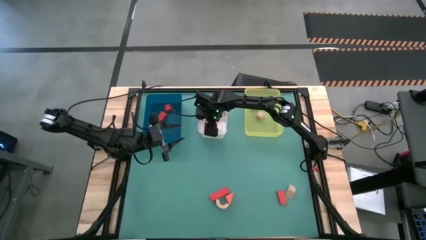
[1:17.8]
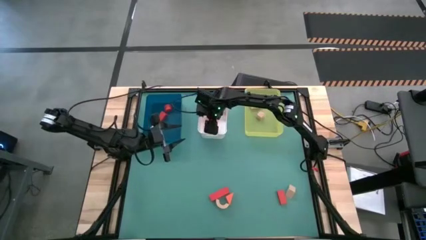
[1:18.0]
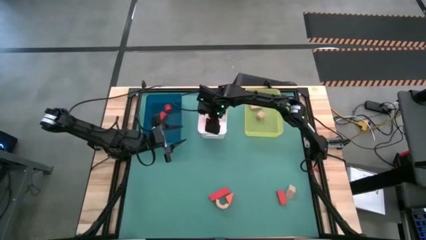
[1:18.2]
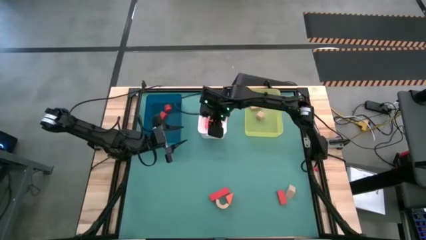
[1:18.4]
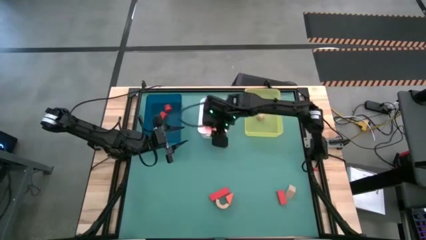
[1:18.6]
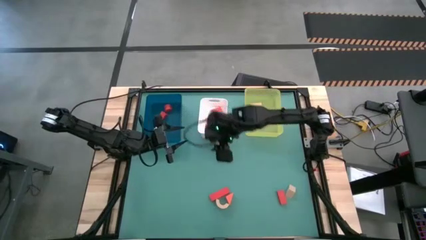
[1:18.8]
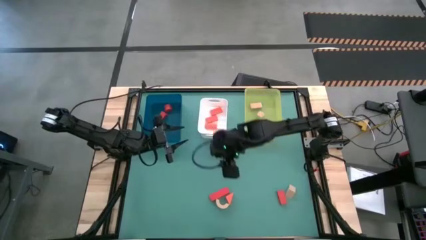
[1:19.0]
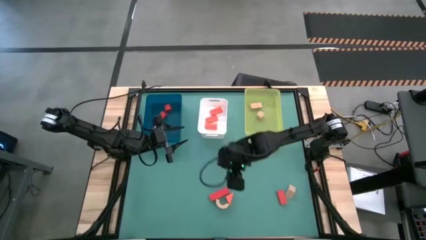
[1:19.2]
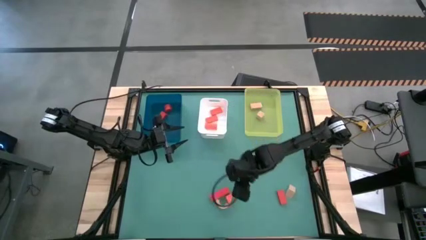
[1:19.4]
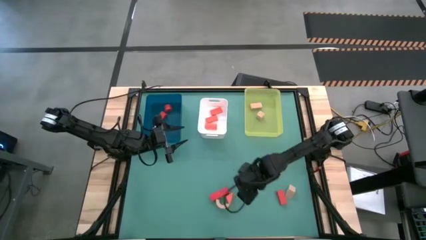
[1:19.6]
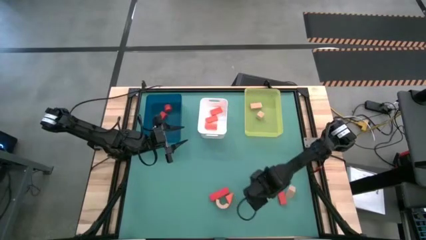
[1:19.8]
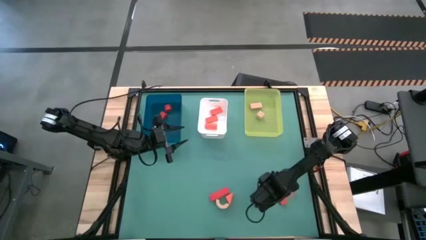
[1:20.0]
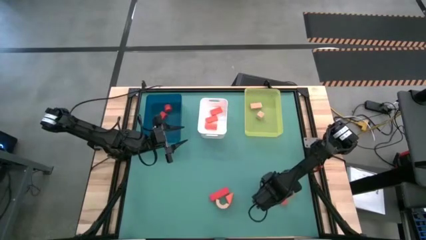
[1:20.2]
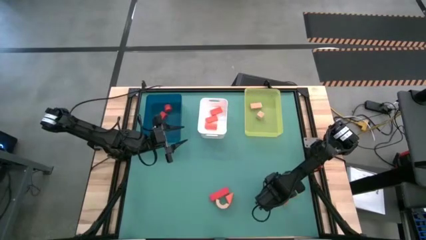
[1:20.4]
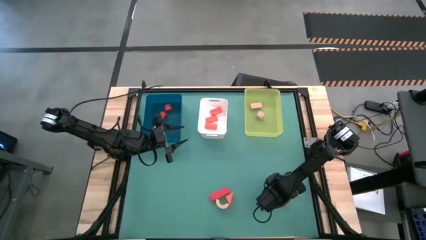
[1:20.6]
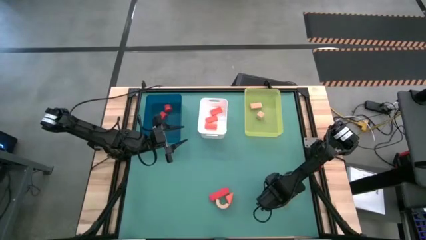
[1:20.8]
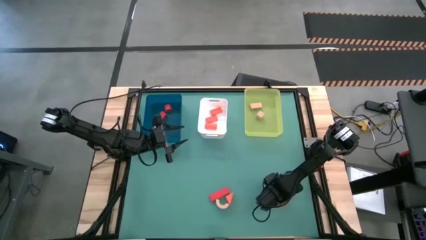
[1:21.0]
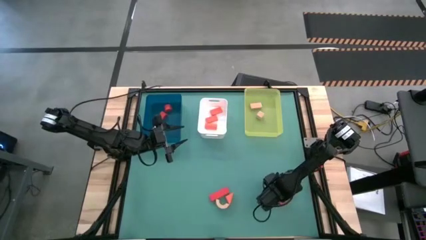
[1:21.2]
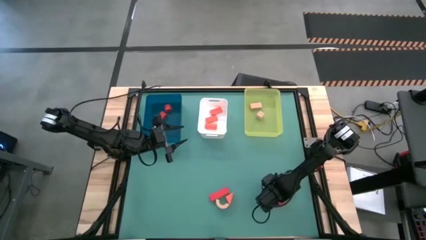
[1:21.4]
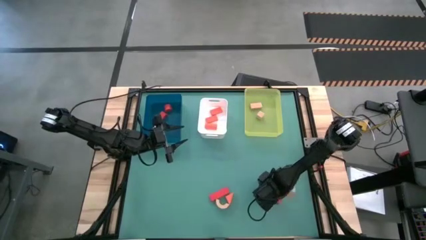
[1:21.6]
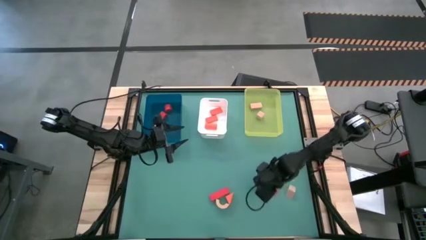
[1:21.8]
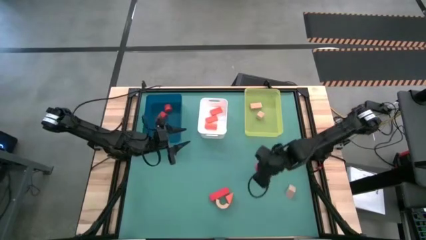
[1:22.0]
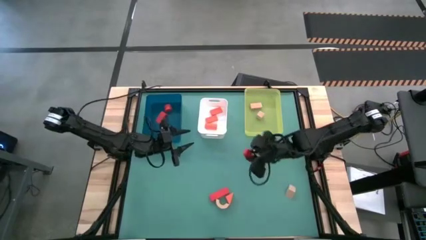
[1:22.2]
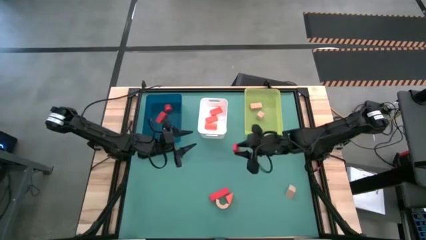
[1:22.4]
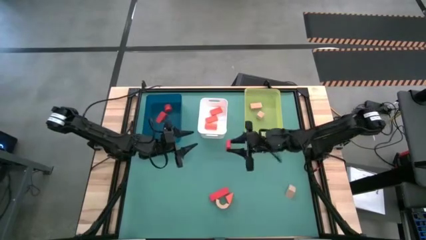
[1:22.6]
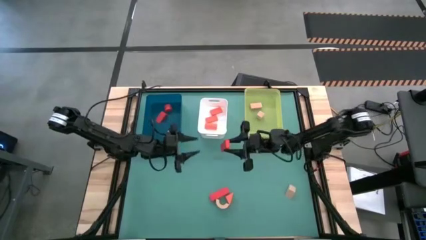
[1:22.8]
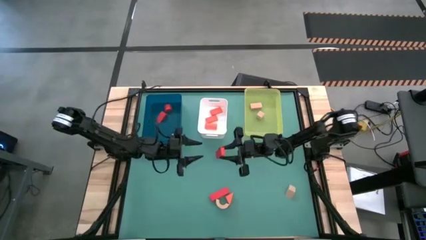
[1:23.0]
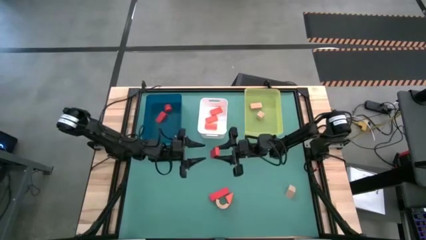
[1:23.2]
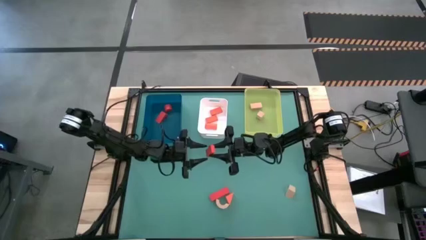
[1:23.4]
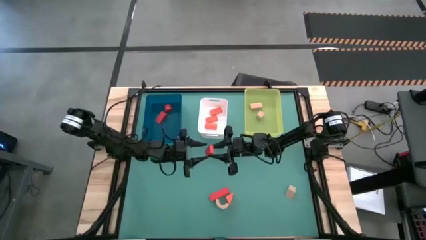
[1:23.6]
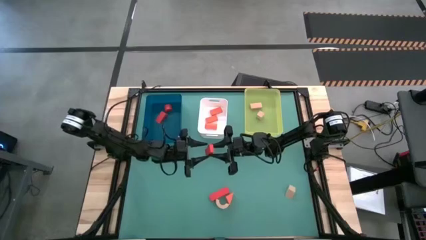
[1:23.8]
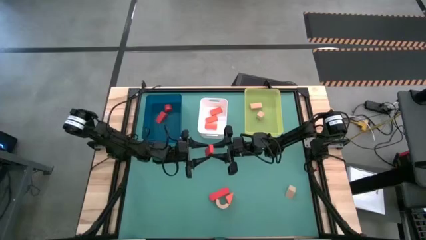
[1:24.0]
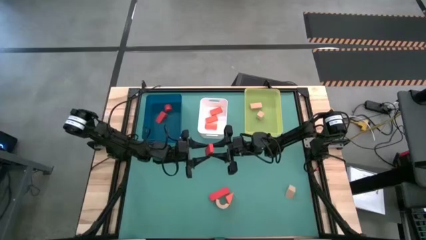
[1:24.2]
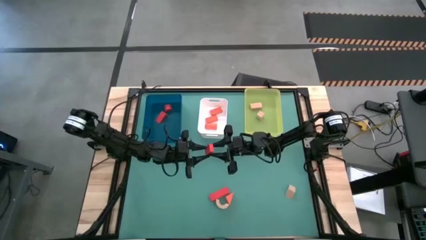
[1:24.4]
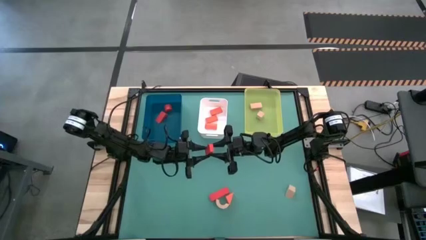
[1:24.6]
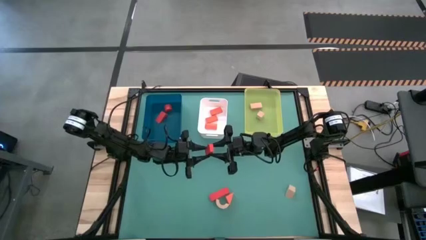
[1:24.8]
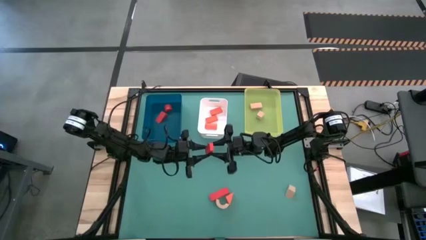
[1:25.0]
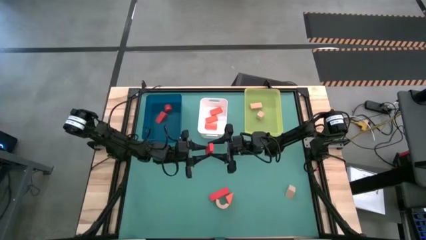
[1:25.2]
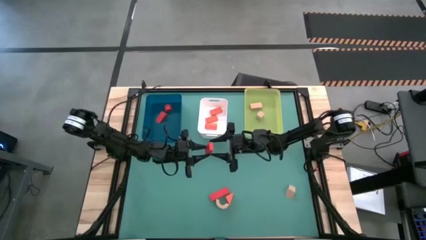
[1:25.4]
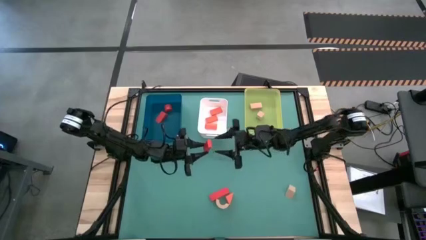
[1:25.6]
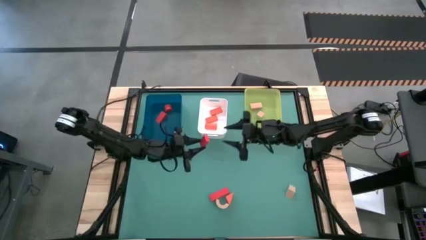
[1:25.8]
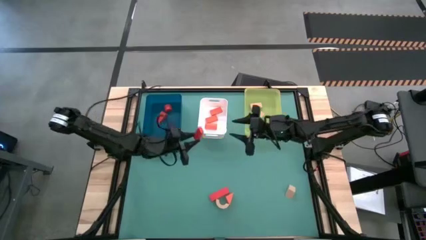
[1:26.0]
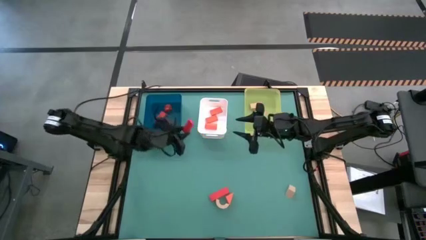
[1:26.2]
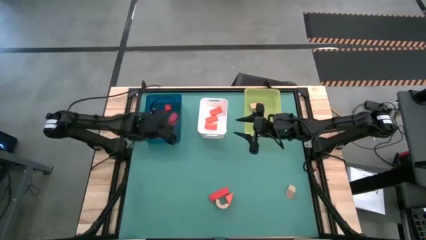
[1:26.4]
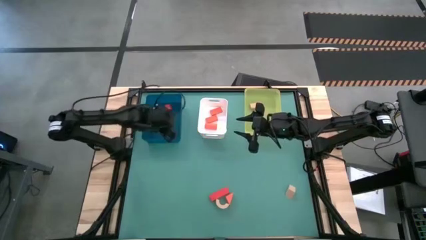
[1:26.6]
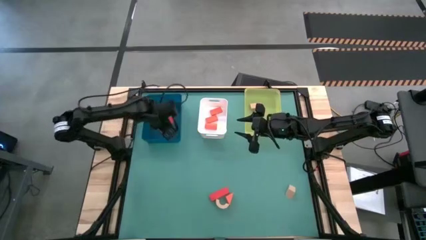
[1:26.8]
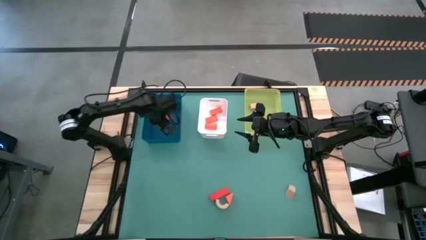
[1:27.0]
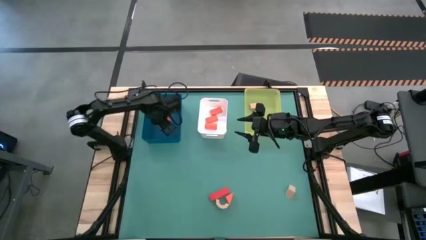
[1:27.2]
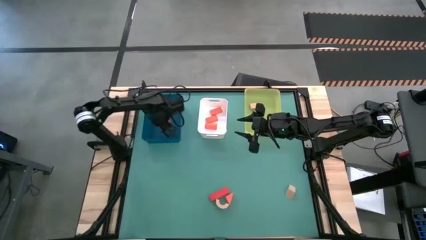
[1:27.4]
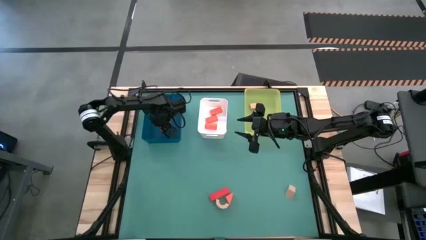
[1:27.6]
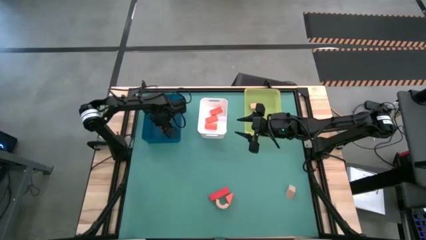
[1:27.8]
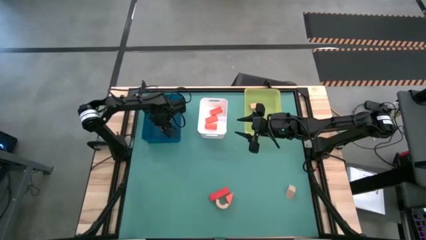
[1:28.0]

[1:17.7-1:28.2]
Task: Sort & place blocks by color
Put the right red block into the blue bin

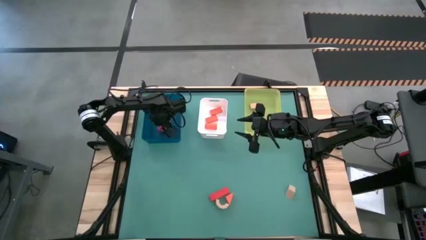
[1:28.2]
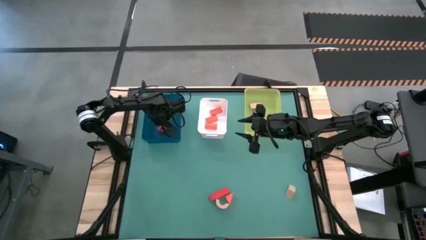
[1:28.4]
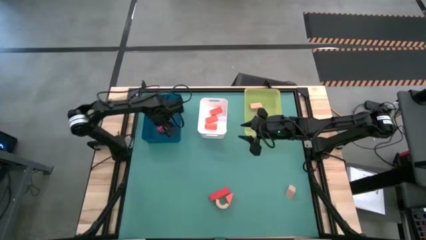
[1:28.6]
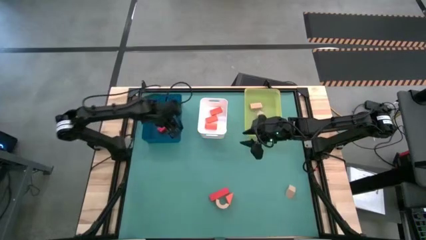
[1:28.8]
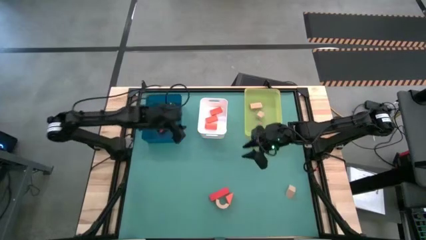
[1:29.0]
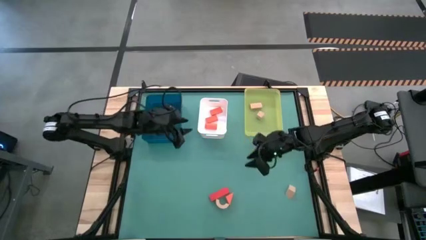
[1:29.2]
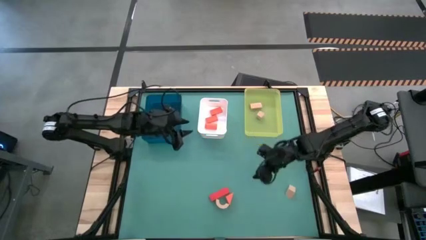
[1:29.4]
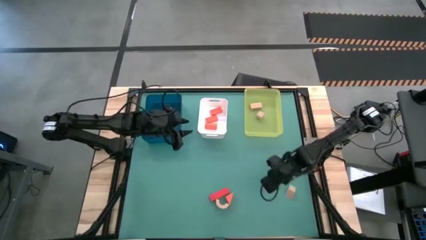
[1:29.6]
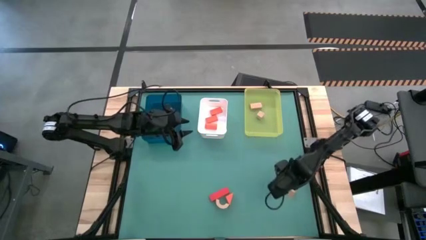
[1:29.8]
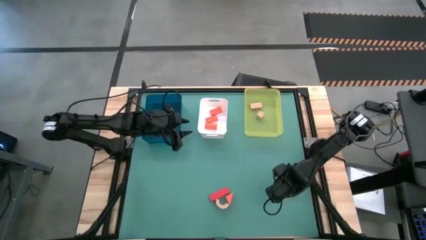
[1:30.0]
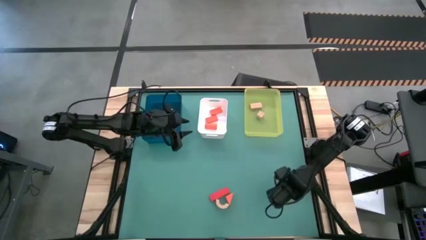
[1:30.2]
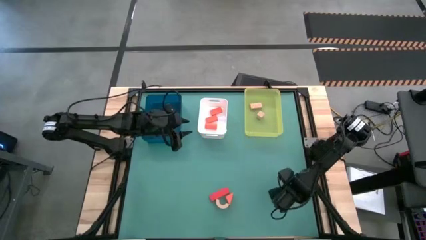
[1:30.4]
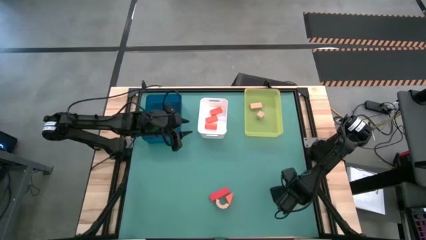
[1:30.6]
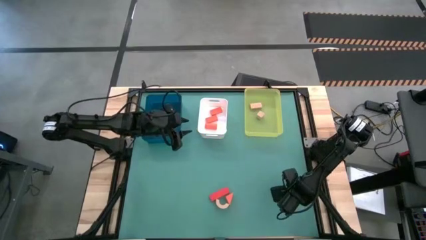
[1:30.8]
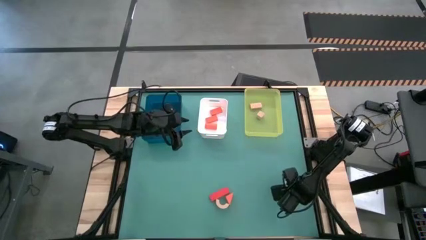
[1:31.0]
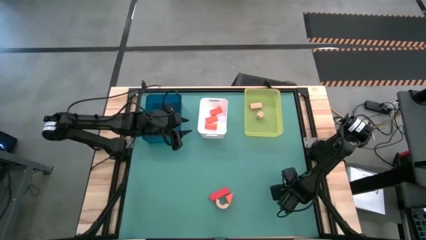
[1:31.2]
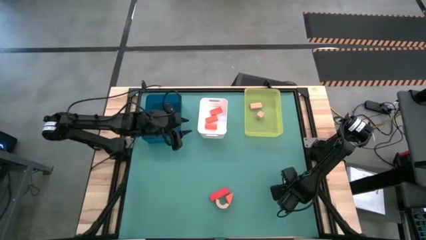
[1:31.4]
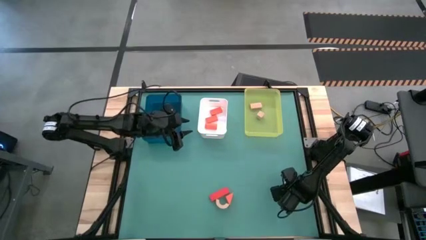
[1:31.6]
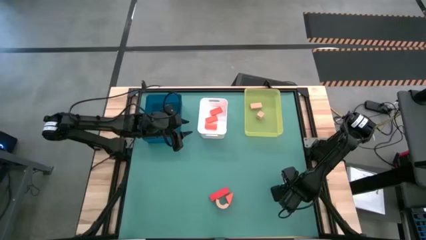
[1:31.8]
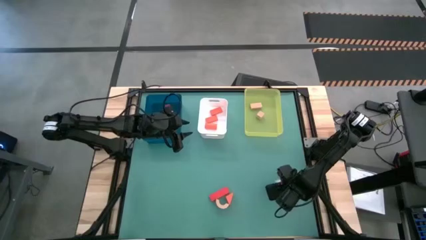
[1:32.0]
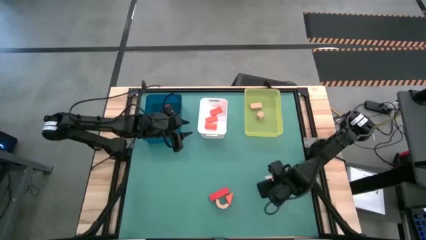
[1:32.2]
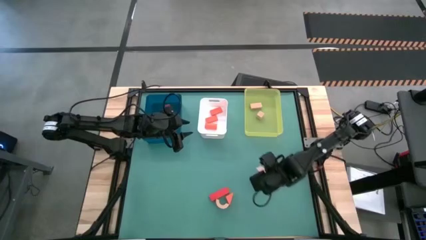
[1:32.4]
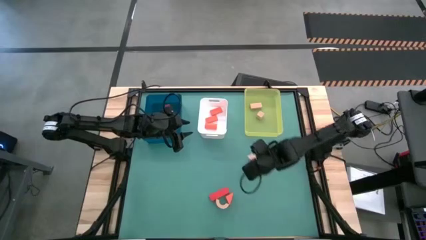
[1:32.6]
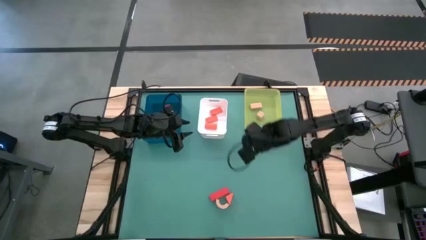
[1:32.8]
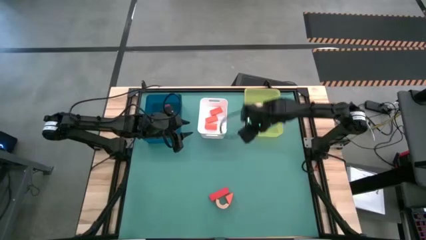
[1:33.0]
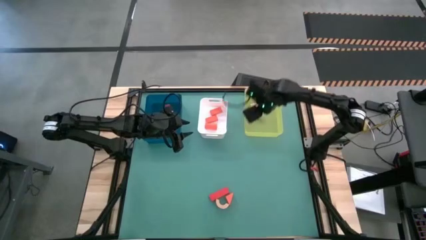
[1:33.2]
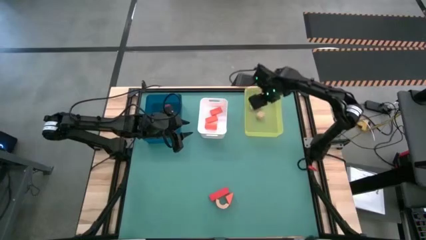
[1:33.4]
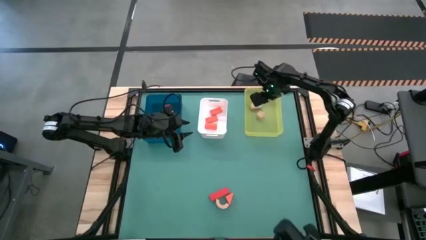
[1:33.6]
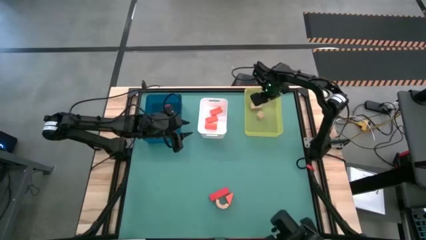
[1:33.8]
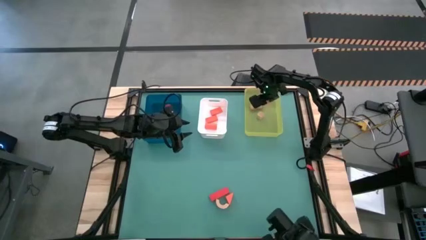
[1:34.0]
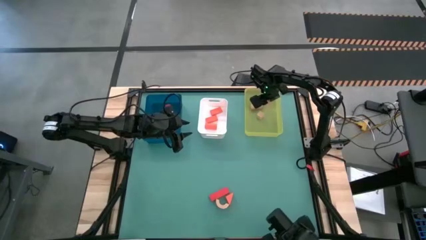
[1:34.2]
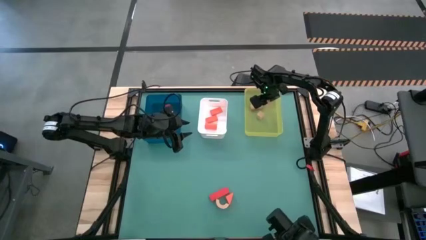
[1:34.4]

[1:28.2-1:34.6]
Put the right light brown block into the yellow bin
